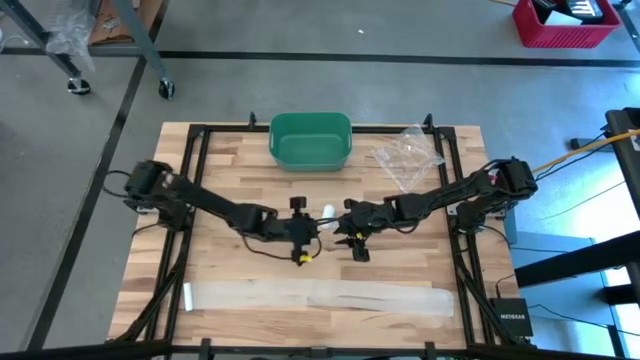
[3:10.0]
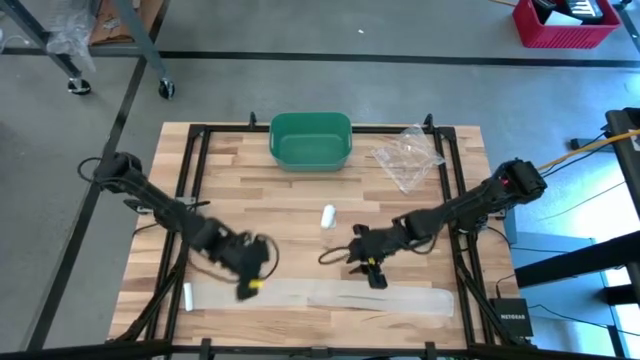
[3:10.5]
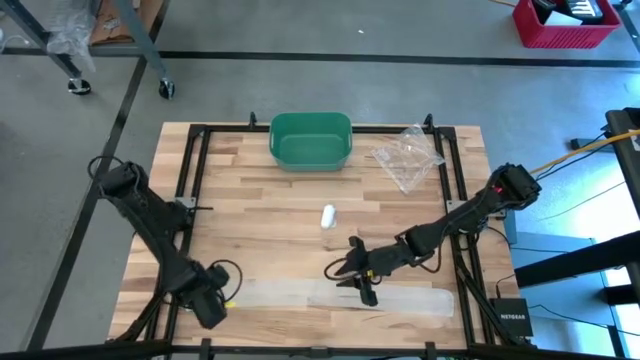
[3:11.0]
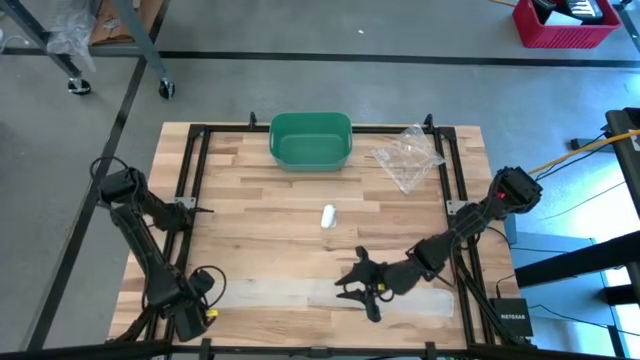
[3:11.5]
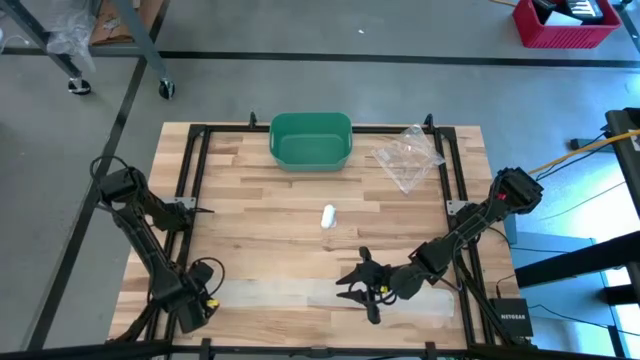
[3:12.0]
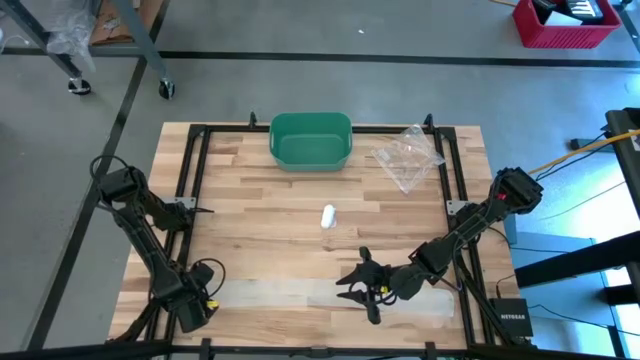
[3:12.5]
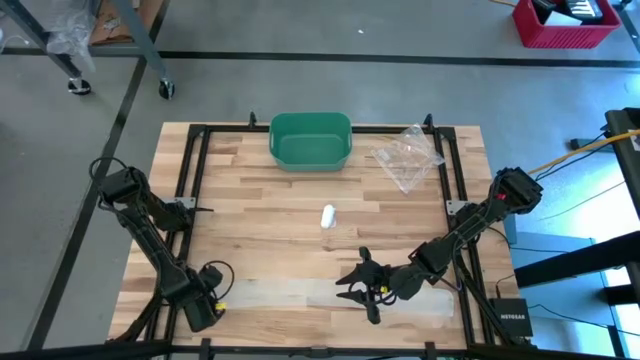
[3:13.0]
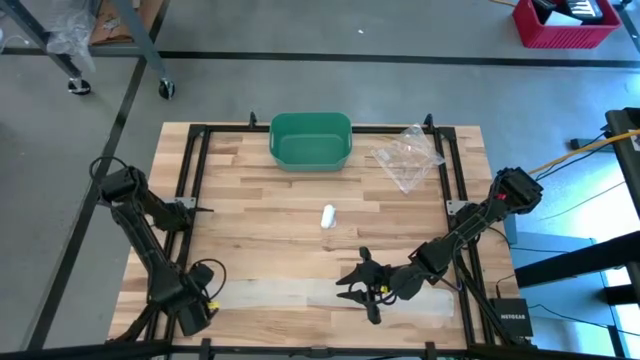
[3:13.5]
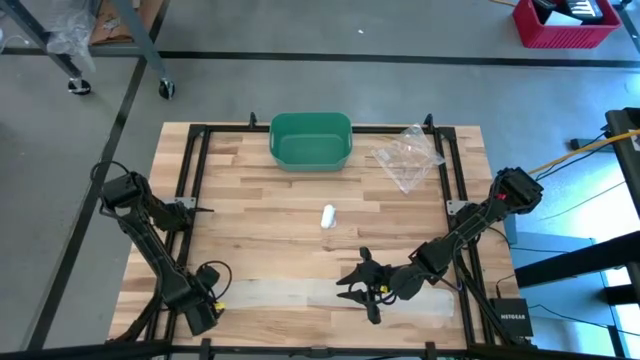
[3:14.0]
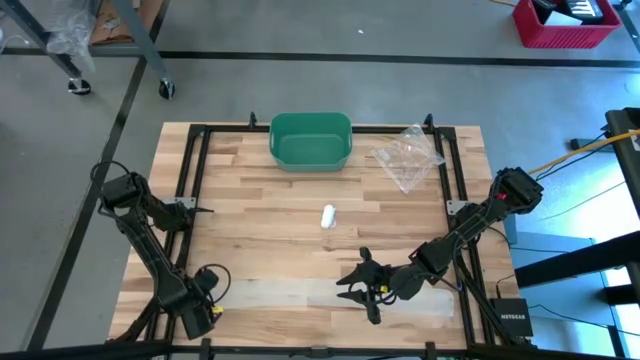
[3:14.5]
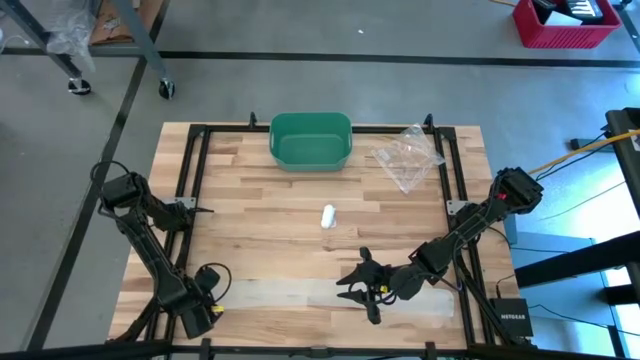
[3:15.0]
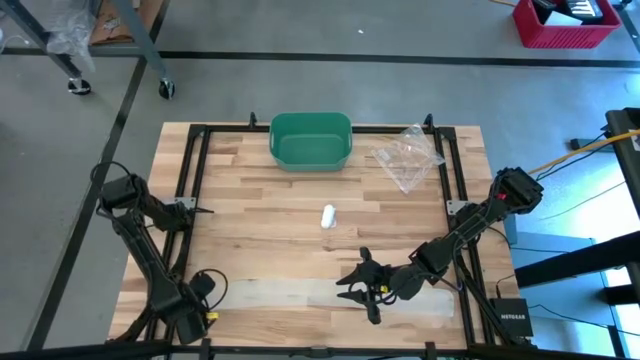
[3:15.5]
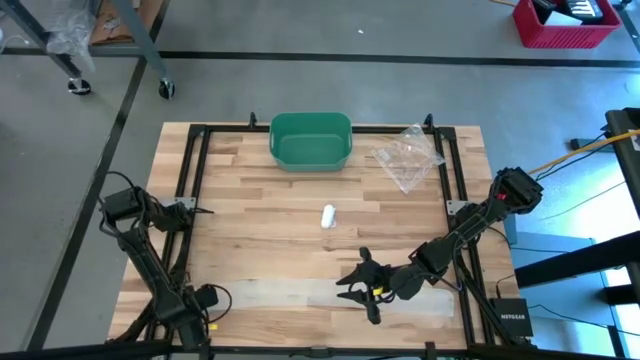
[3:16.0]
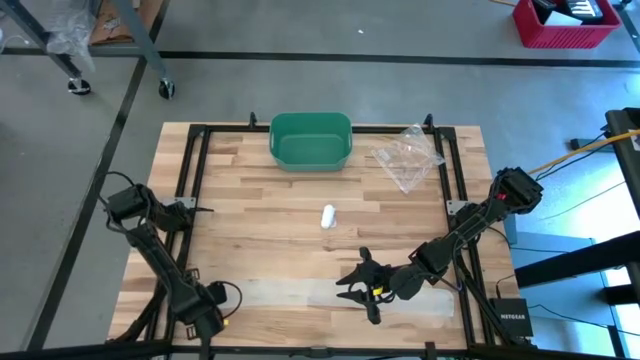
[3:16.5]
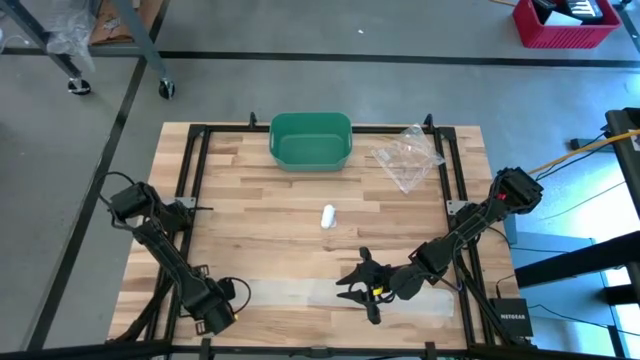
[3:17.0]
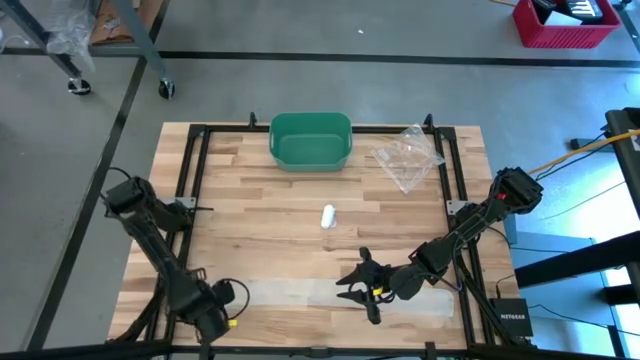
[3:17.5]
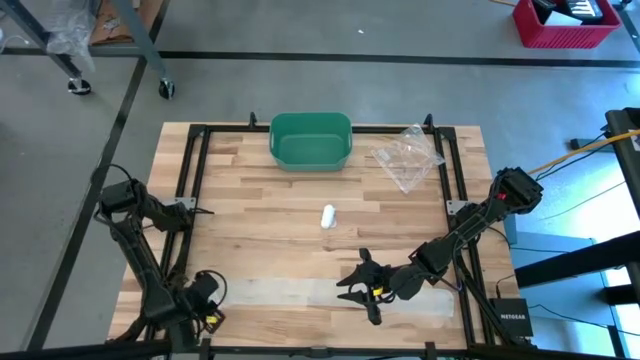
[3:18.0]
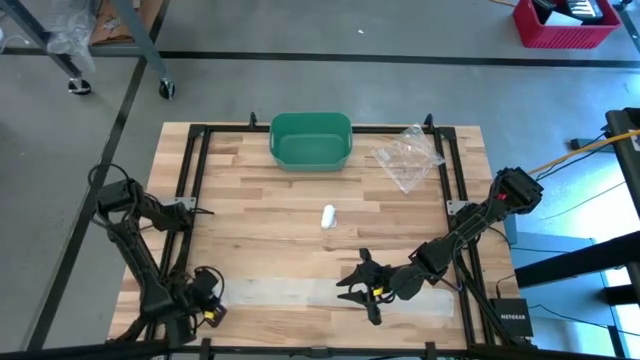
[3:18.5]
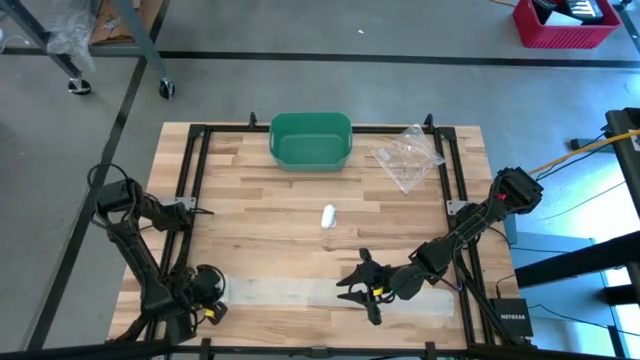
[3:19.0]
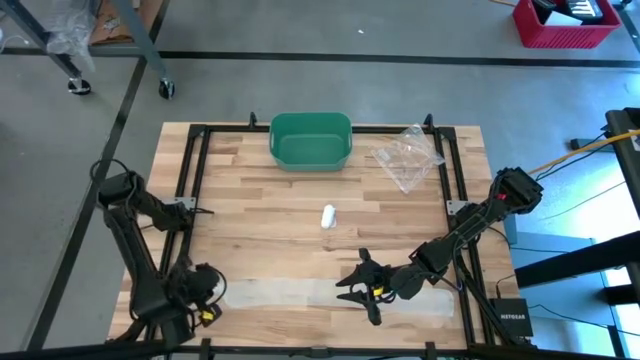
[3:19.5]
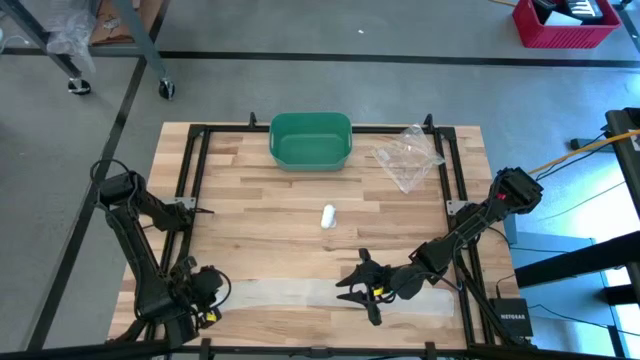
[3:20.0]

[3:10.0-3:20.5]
Task: Roll bandage
Roll the bottom white bandage

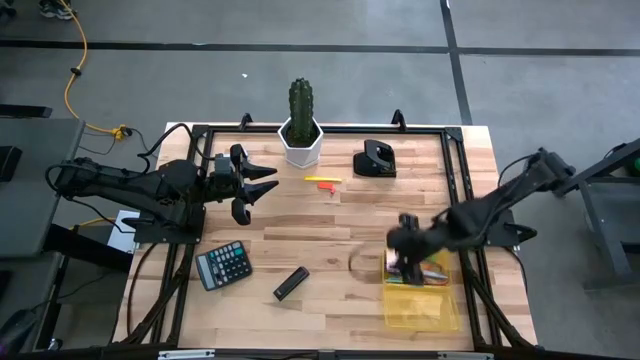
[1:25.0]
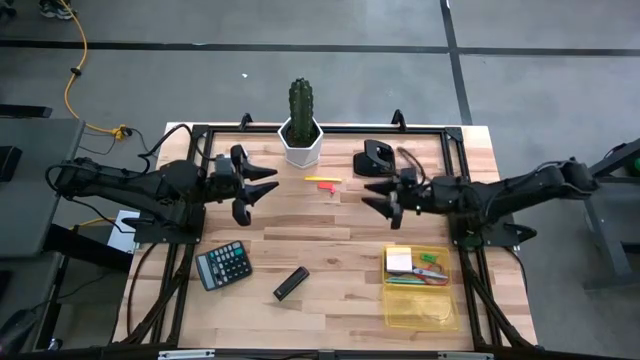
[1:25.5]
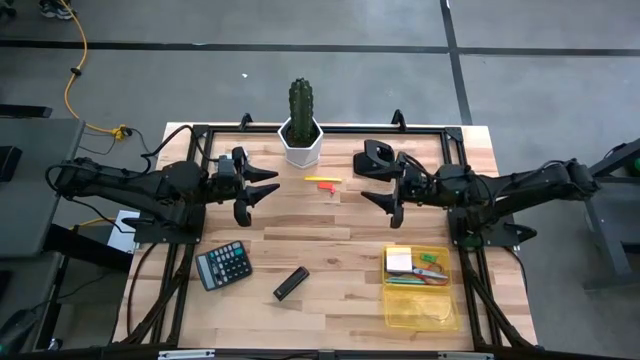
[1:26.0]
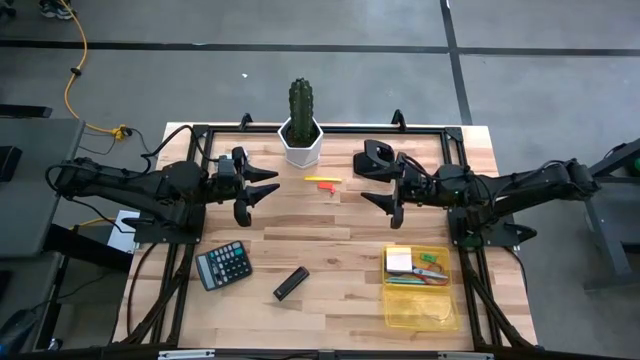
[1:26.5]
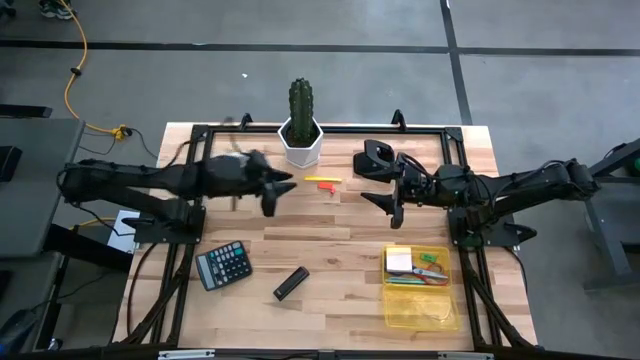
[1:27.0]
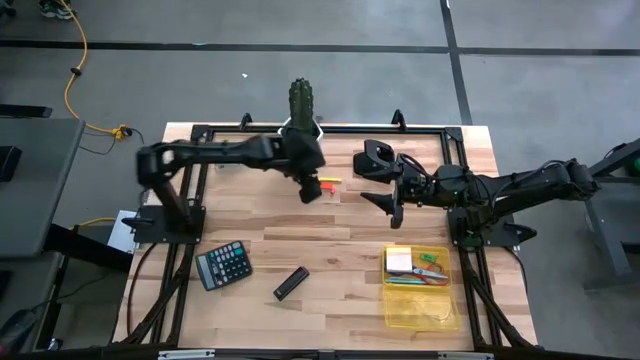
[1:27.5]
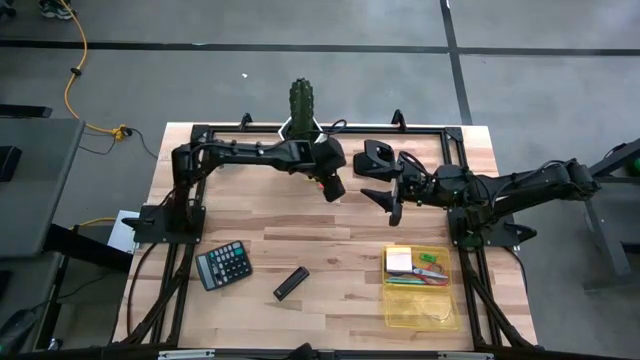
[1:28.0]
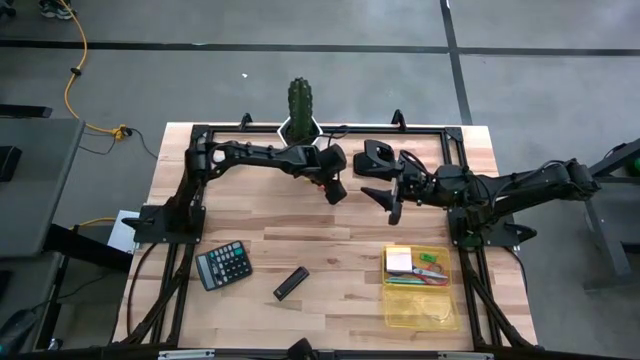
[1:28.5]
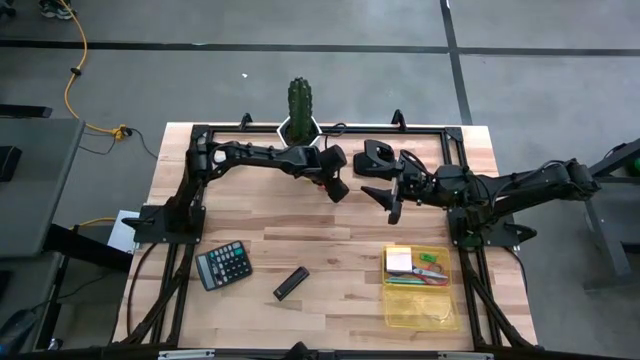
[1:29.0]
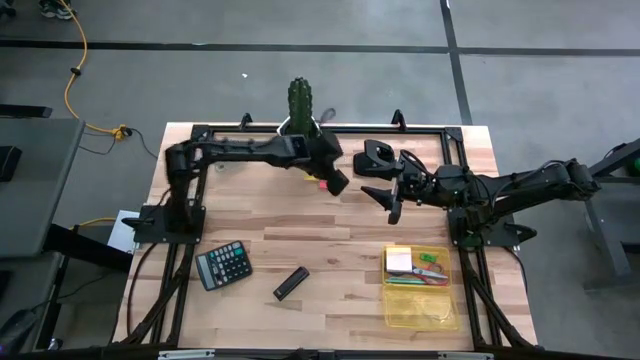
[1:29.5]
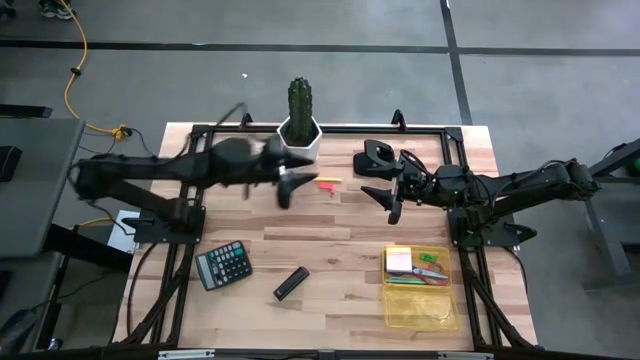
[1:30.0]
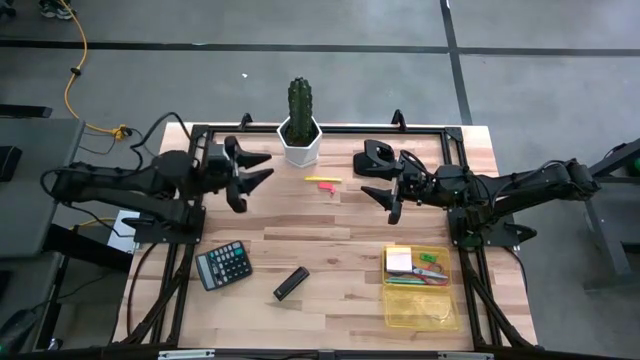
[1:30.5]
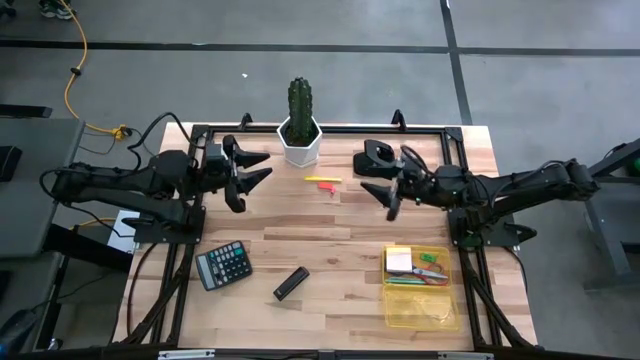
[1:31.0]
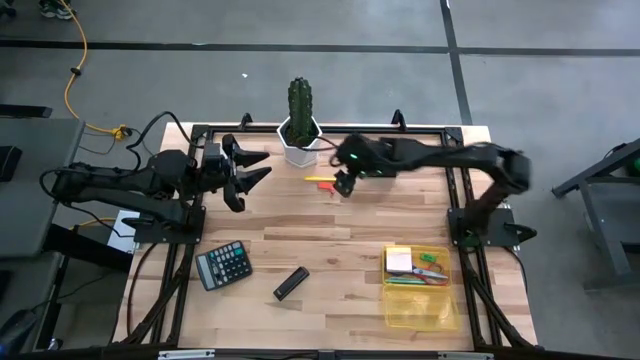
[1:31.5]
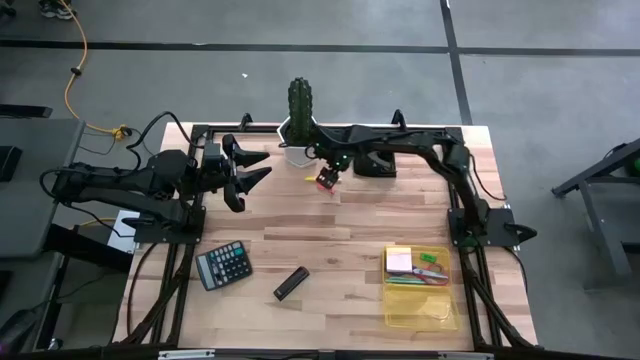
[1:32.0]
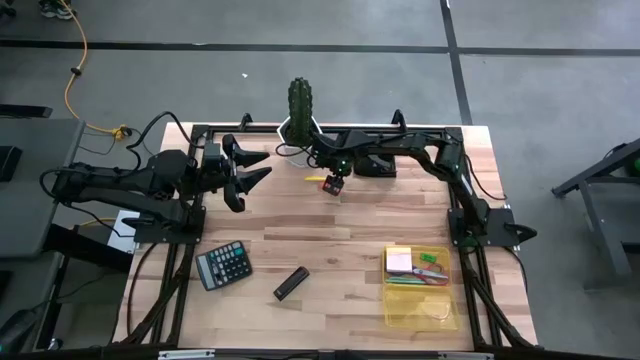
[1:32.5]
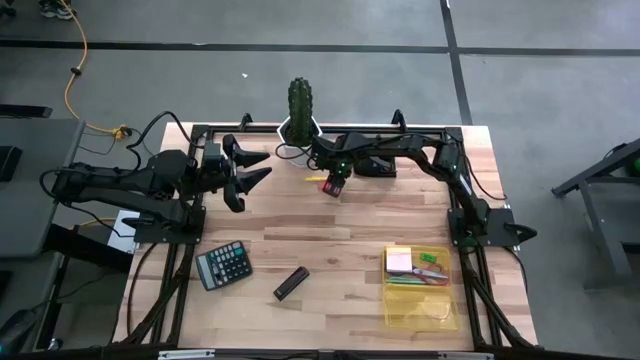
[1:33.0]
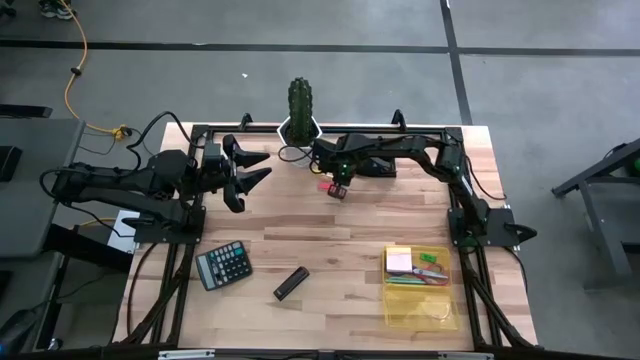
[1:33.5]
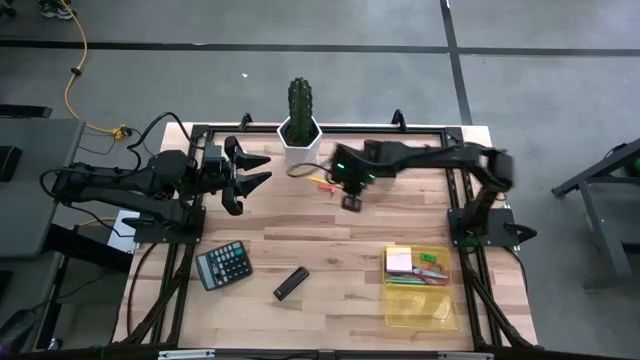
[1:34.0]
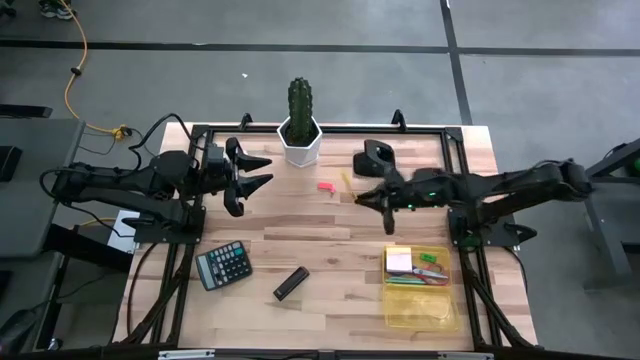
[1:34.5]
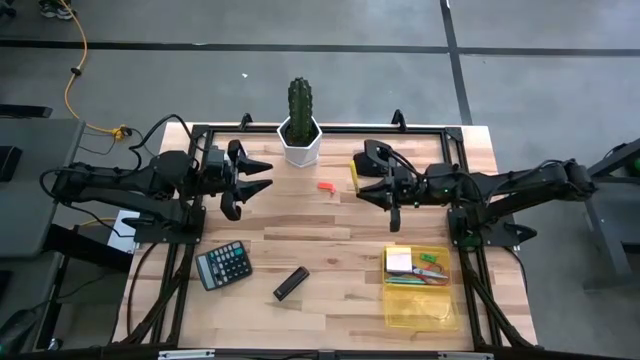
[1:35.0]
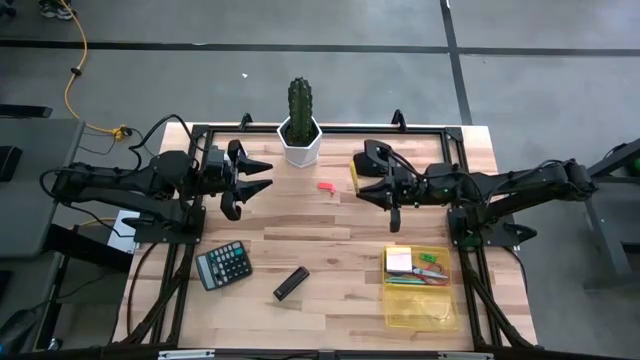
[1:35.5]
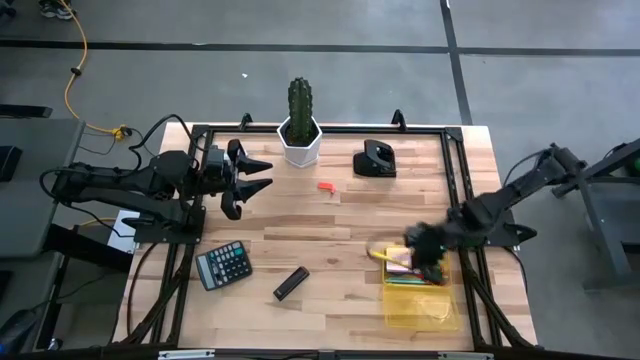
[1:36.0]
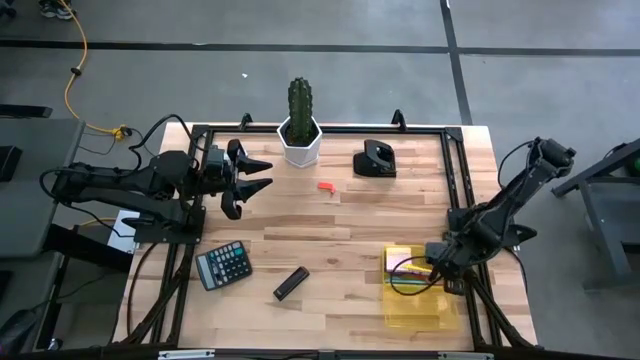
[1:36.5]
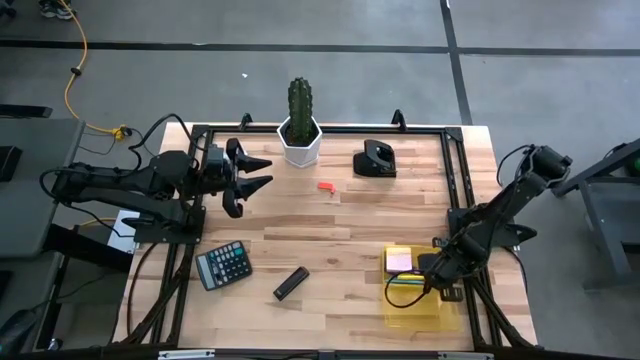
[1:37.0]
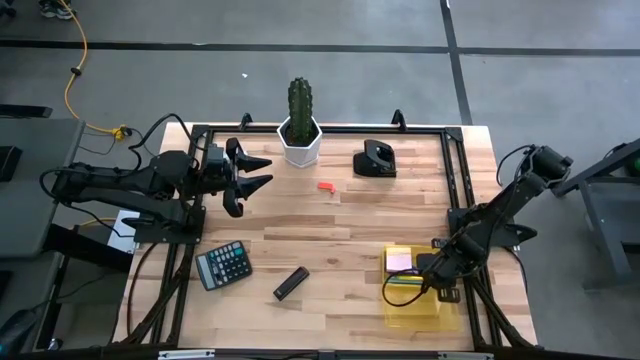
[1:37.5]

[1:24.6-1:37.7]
Task: Pack school essentials
Put the yellow pen on the yellow supply box
